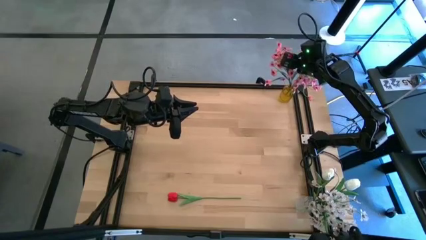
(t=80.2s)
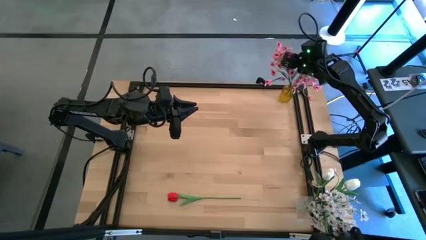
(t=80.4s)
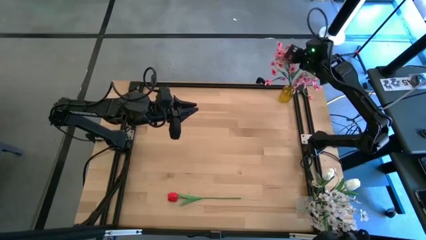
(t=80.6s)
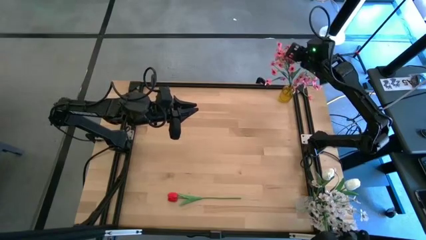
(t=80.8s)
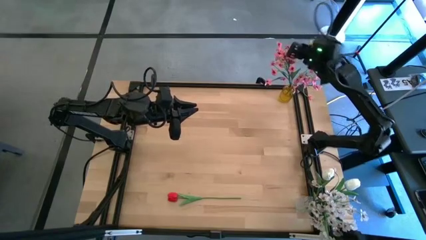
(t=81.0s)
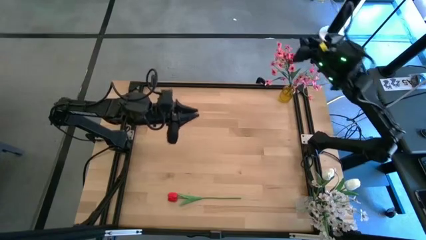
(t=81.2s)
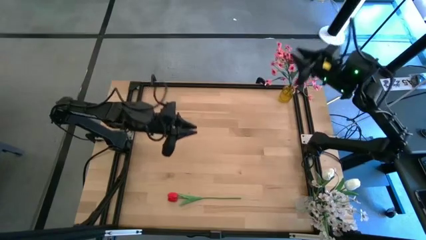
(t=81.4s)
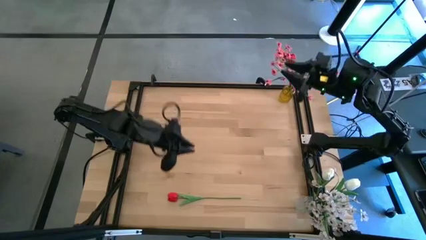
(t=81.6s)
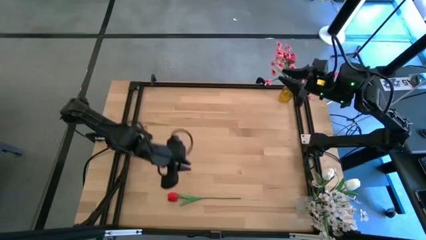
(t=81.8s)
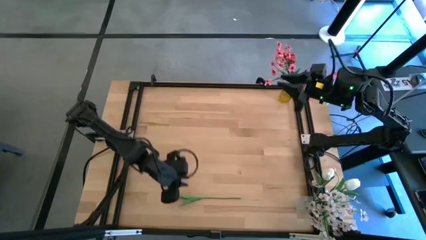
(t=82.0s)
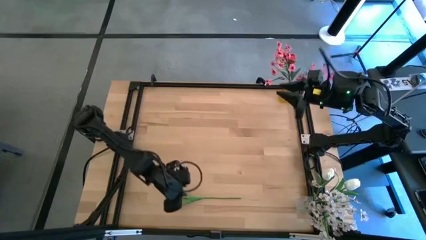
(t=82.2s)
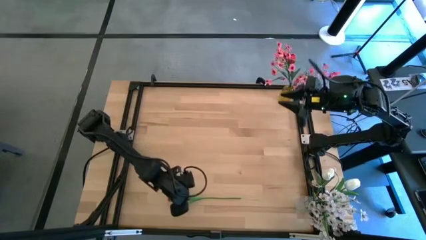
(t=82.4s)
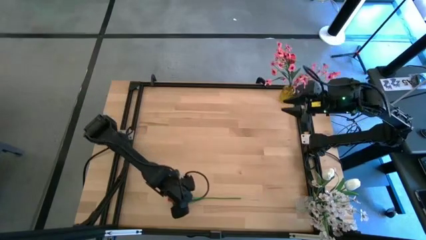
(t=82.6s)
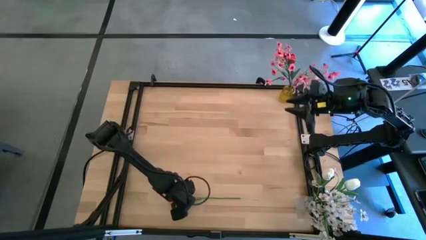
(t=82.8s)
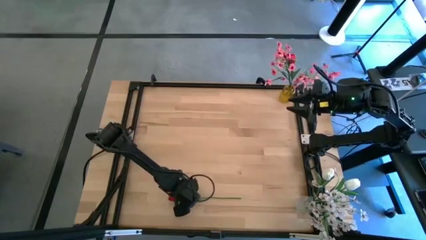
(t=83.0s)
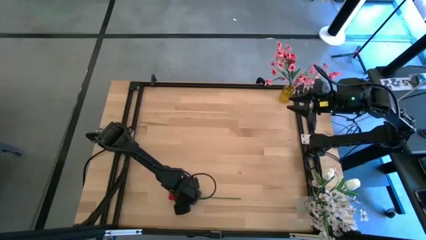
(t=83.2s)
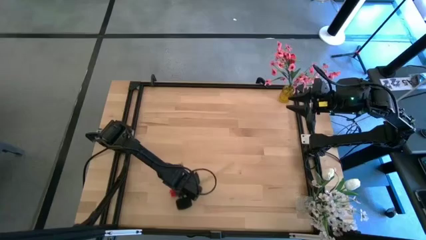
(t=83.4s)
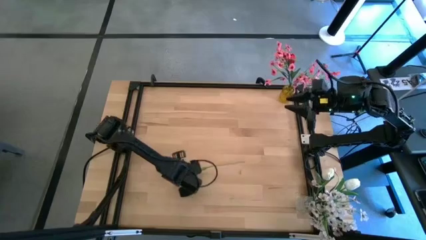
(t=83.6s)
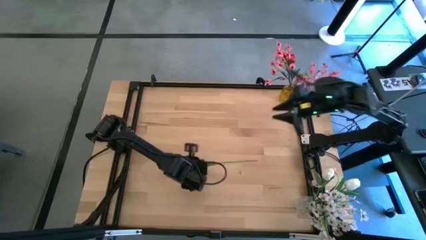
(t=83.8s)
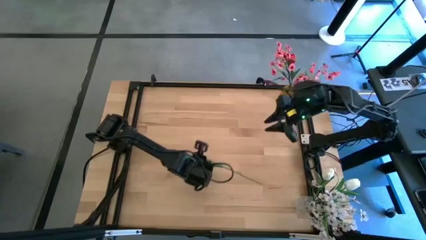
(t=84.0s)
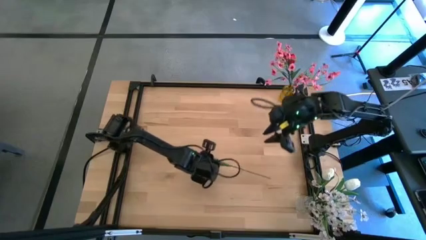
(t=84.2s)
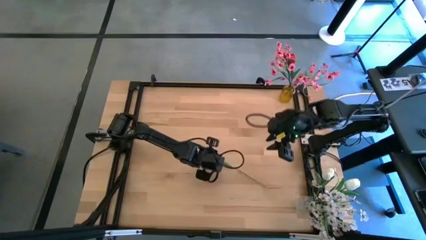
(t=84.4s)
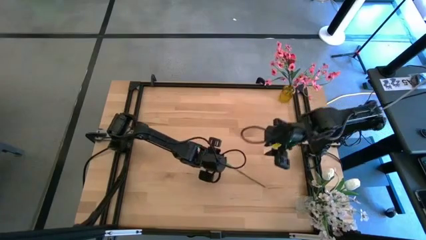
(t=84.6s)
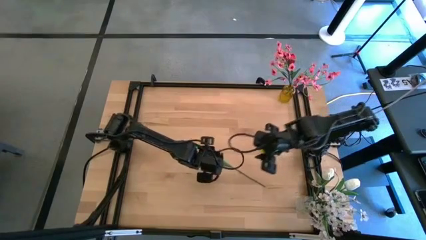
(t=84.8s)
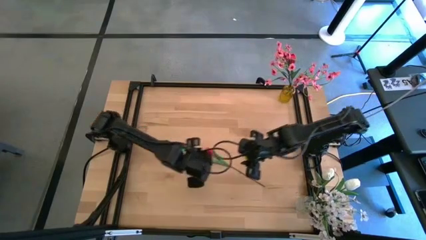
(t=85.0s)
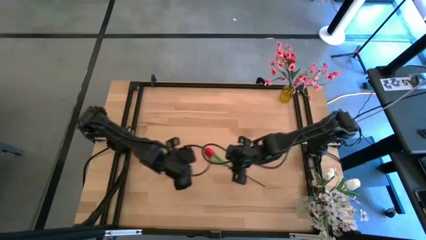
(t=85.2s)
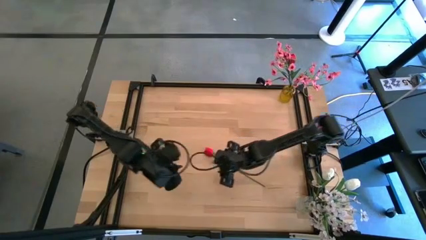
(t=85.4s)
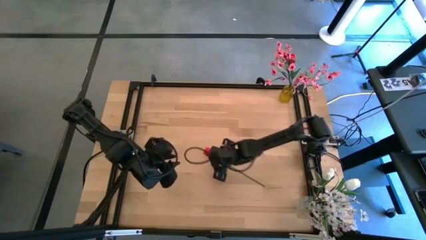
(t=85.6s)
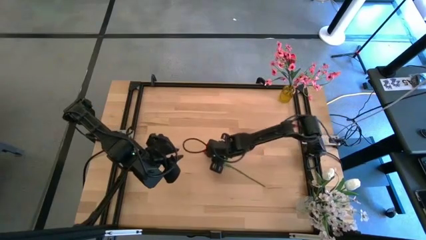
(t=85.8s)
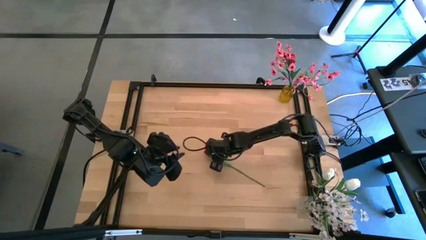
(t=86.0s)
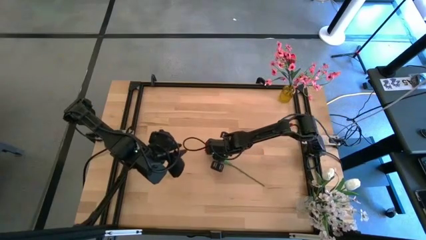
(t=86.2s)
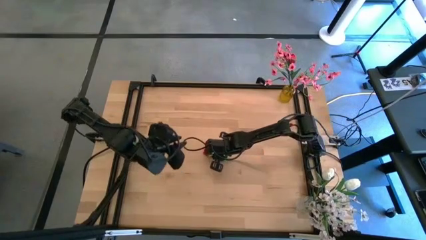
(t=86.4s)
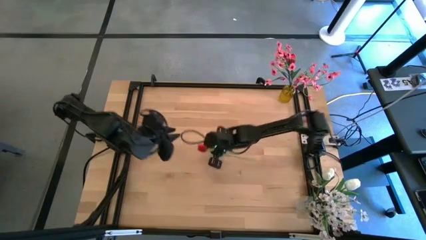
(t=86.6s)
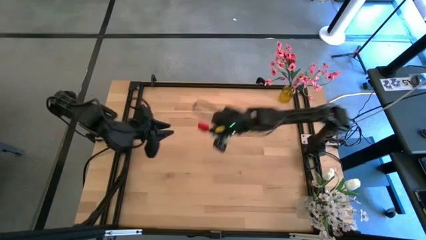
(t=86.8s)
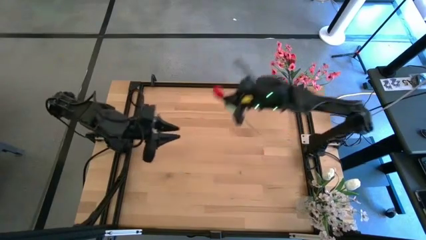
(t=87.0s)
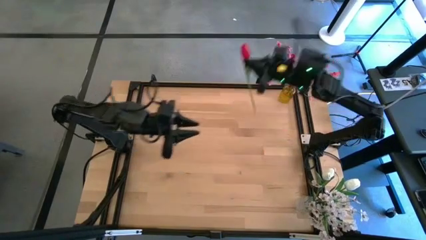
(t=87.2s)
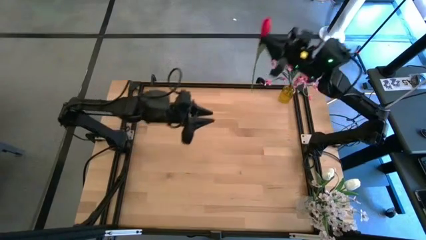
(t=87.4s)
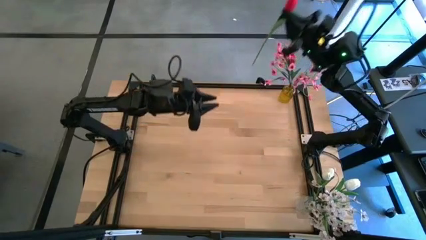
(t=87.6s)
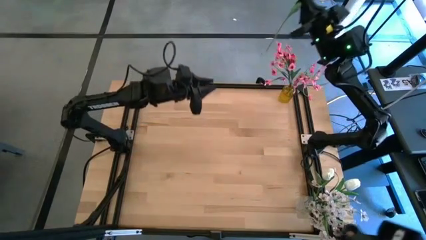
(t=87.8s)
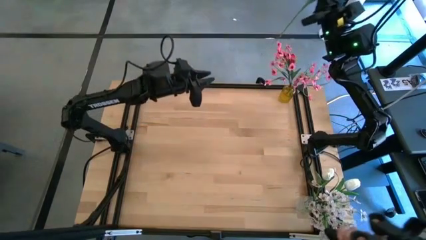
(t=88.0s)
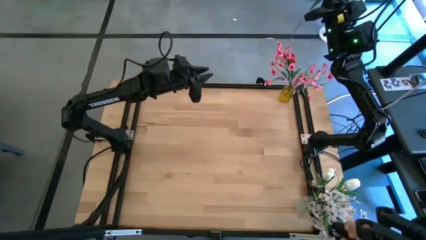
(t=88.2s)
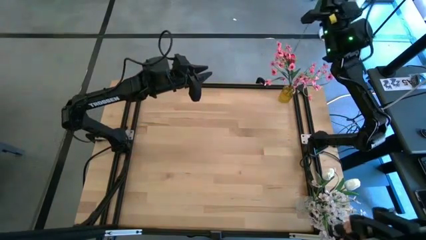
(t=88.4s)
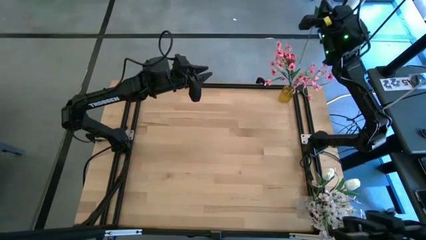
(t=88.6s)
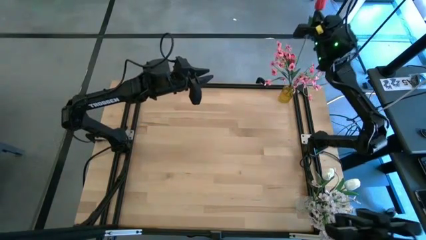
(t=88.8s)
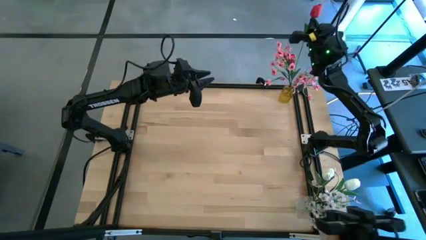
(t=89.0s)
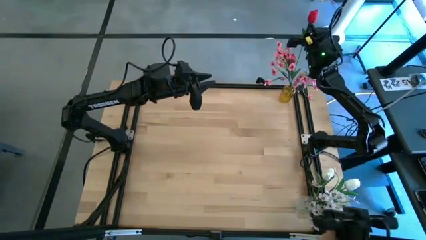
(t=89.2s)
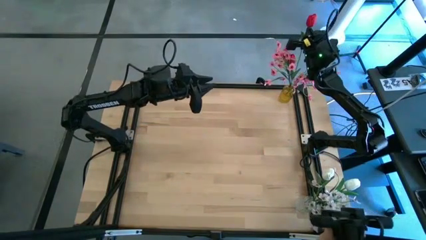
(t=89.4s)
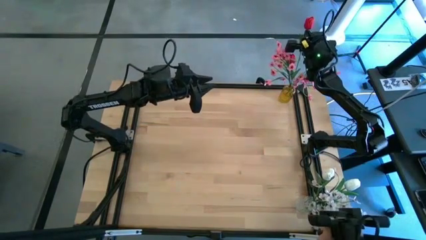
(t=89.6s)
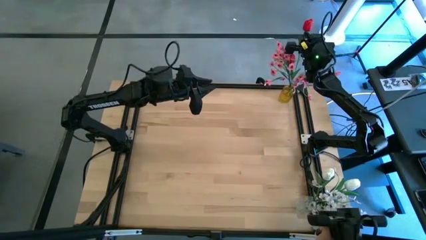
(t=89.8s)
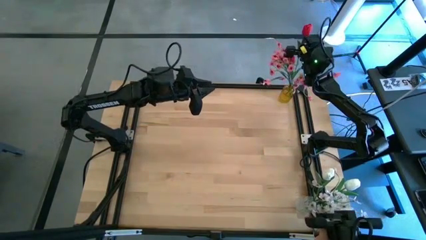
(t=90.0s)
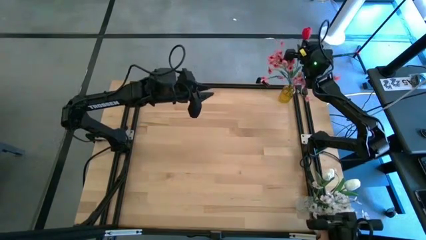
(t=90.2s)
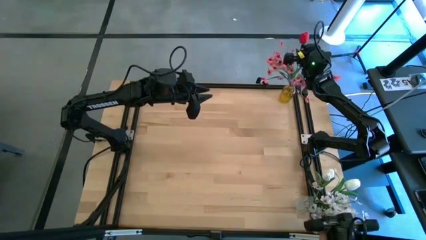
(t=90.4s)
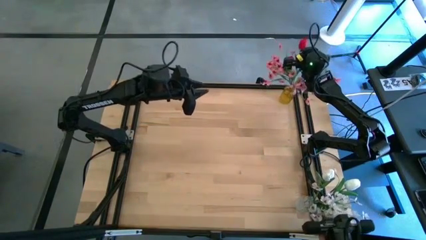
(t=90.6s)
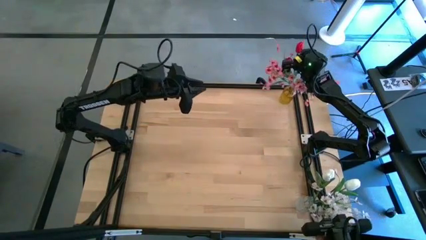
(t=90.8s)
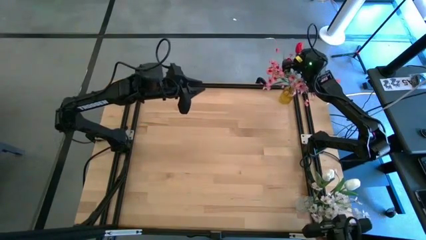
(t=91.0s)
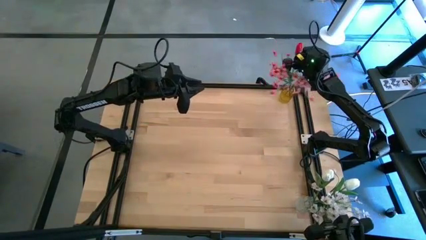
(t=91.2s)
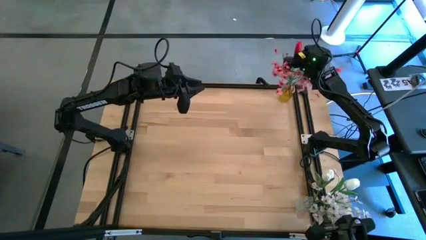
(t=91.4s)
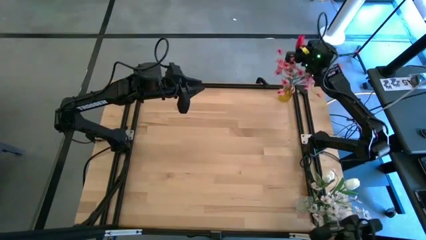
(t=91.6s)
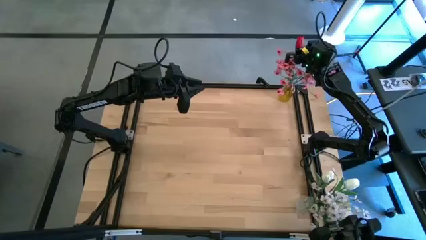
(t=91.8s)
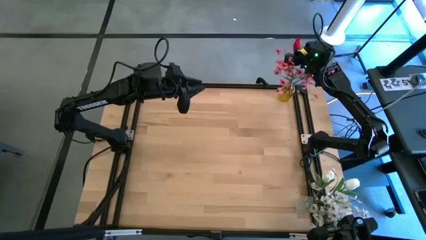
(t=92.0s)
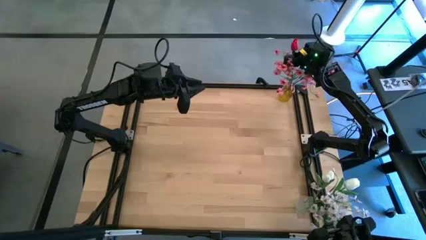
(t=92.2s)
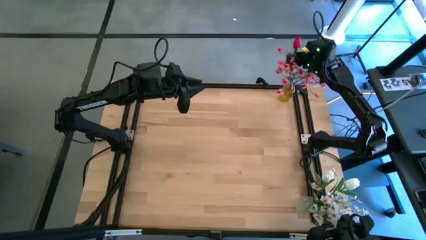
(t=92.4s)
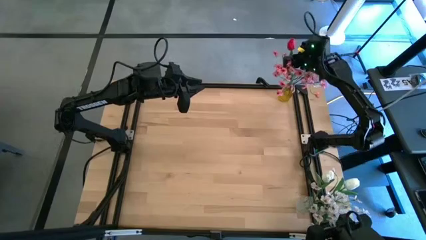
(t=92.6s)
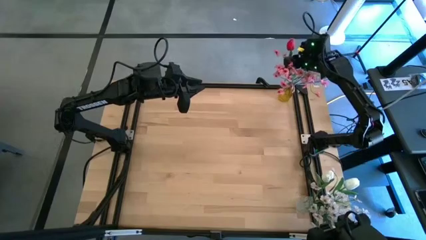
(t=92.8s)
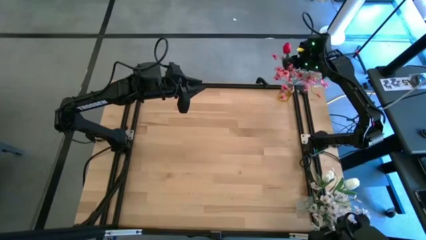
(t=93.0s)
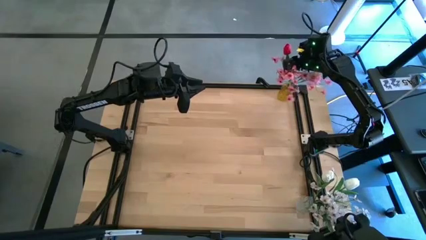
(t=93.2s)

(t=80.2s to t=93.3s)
Task: Sort flowers into vase by color
Put the red flower into the yellow vase
